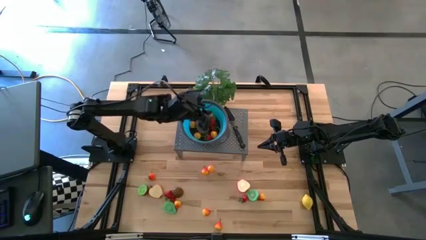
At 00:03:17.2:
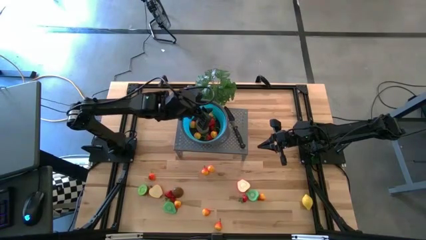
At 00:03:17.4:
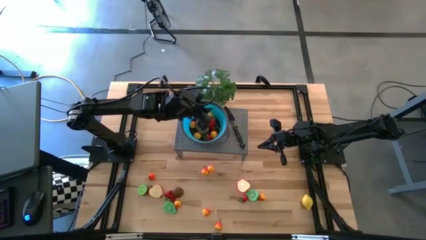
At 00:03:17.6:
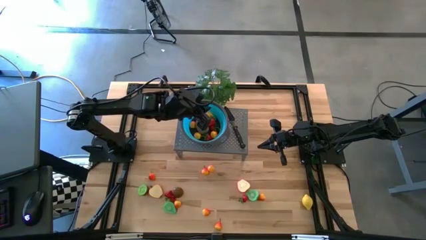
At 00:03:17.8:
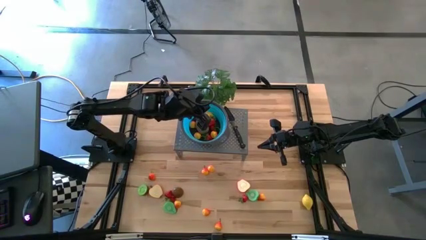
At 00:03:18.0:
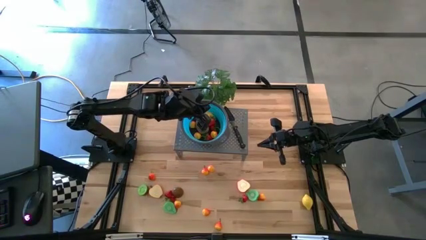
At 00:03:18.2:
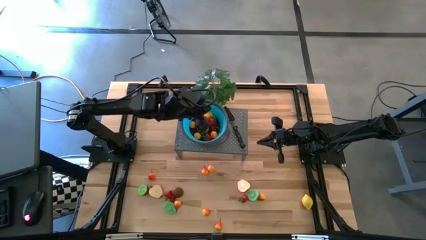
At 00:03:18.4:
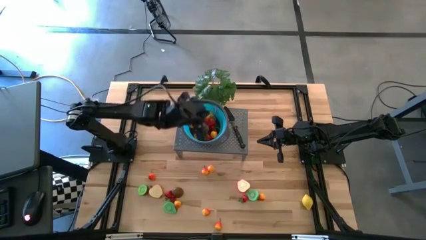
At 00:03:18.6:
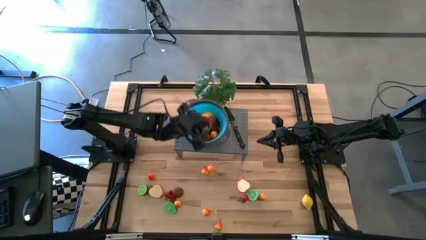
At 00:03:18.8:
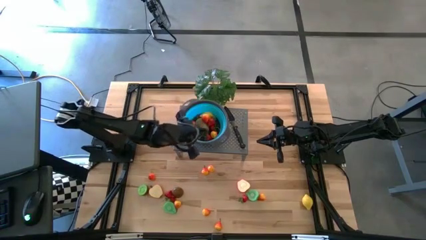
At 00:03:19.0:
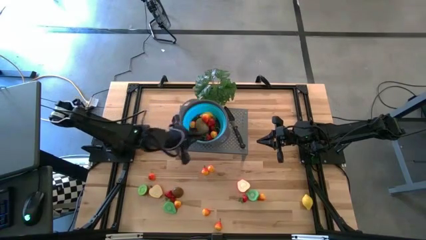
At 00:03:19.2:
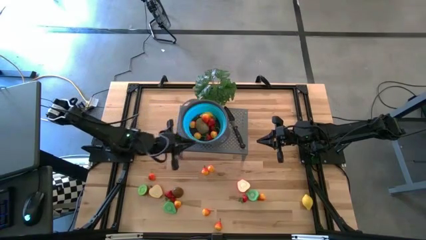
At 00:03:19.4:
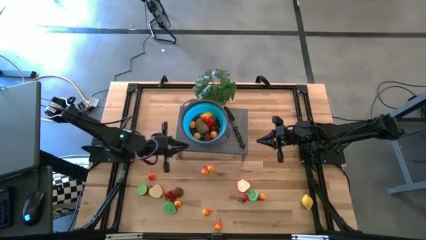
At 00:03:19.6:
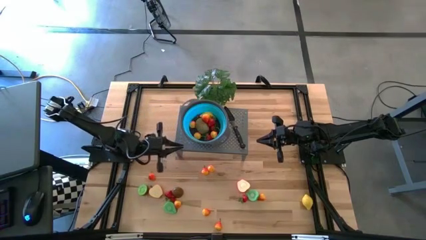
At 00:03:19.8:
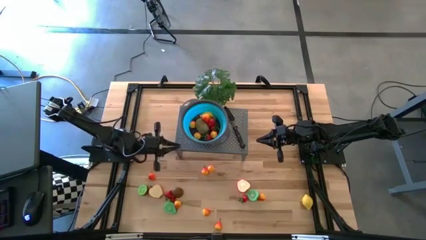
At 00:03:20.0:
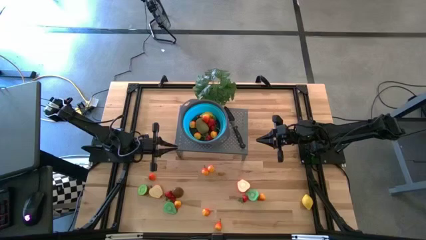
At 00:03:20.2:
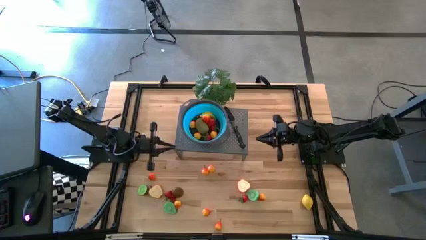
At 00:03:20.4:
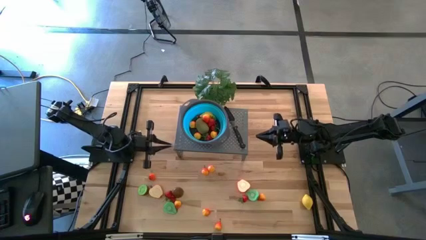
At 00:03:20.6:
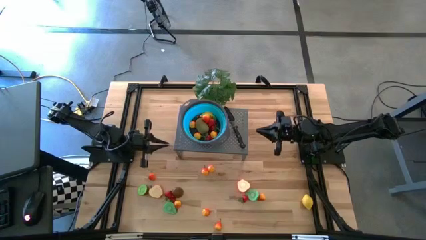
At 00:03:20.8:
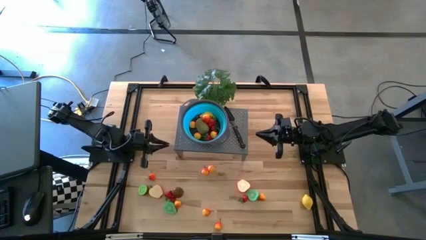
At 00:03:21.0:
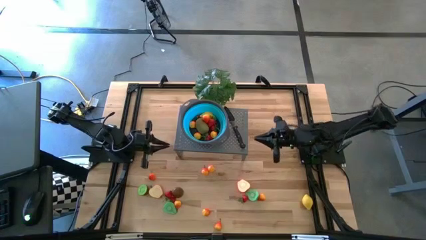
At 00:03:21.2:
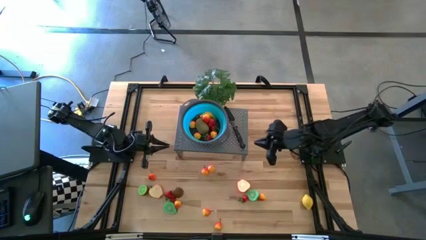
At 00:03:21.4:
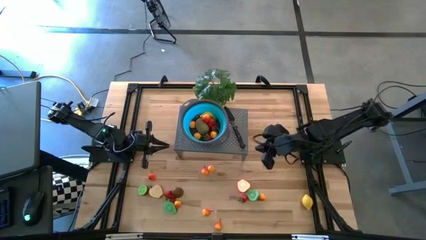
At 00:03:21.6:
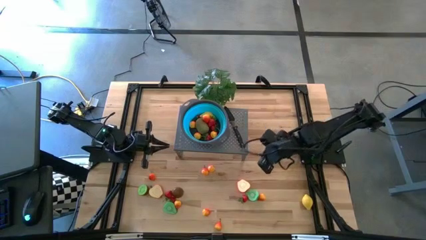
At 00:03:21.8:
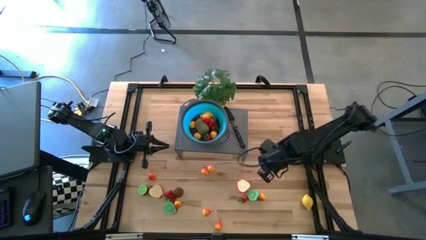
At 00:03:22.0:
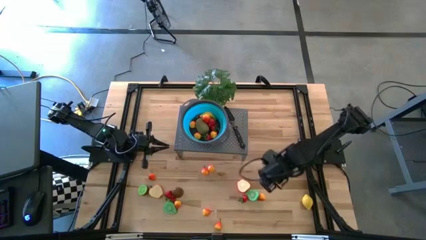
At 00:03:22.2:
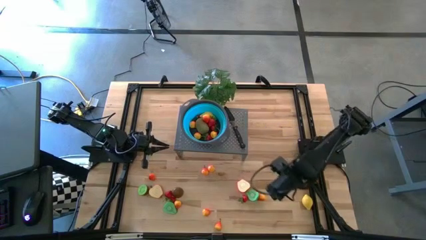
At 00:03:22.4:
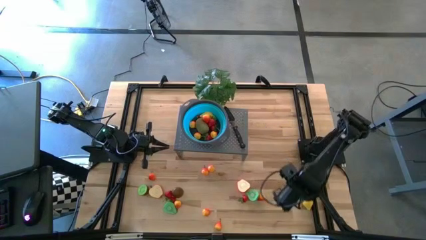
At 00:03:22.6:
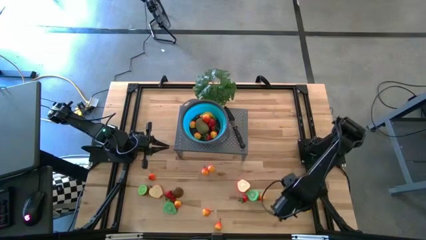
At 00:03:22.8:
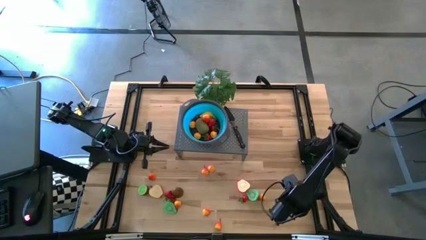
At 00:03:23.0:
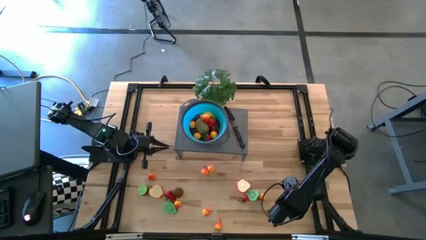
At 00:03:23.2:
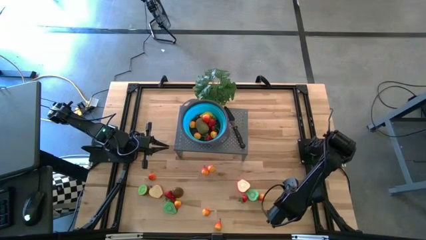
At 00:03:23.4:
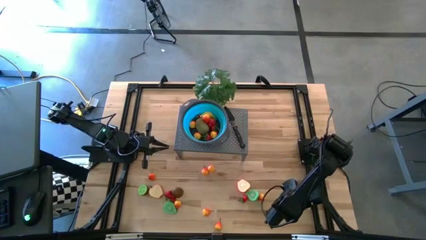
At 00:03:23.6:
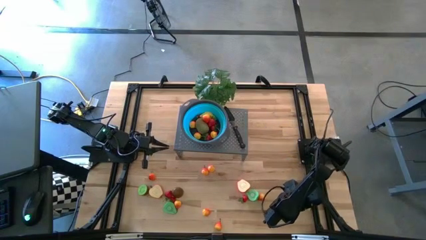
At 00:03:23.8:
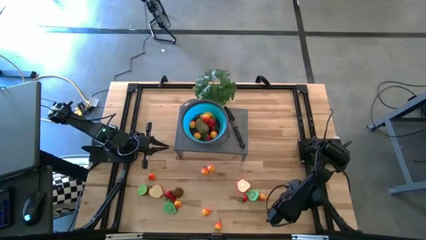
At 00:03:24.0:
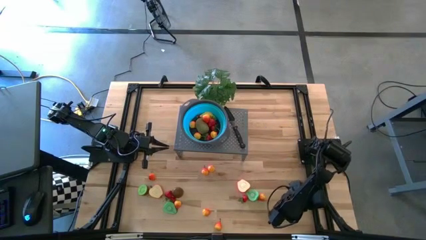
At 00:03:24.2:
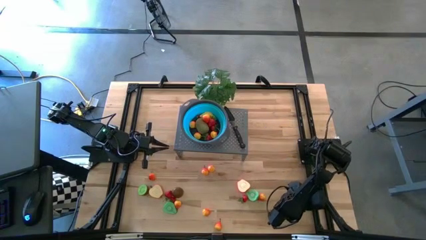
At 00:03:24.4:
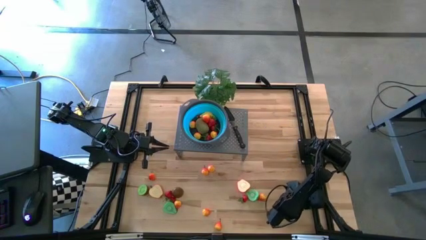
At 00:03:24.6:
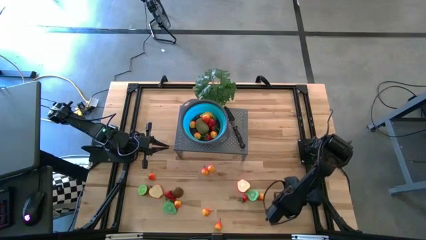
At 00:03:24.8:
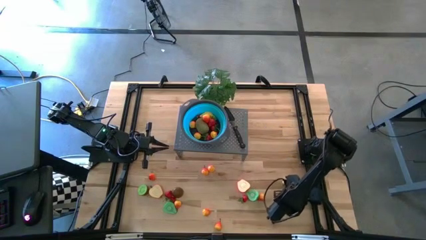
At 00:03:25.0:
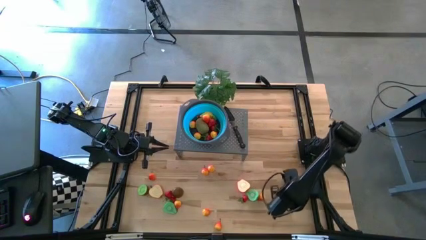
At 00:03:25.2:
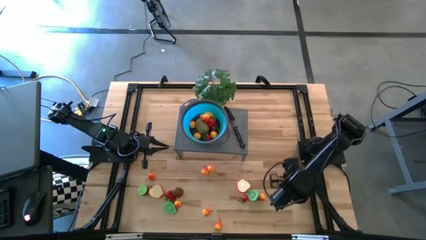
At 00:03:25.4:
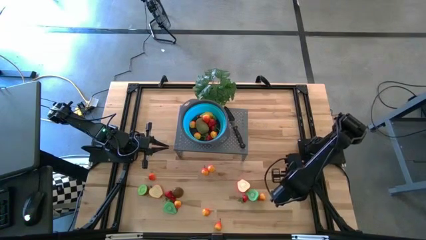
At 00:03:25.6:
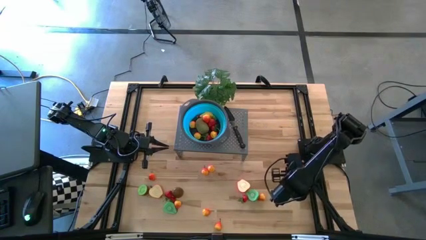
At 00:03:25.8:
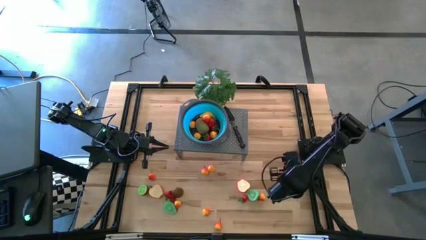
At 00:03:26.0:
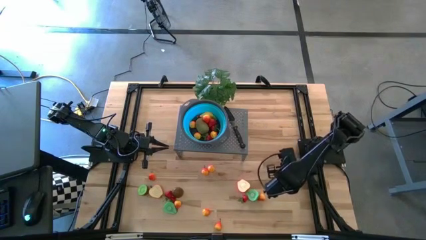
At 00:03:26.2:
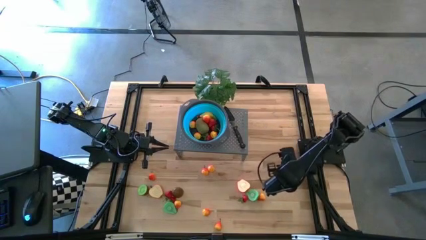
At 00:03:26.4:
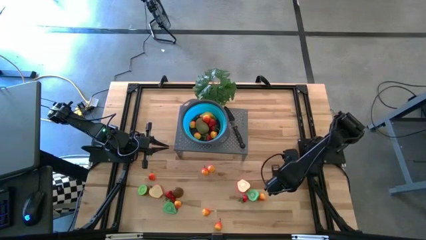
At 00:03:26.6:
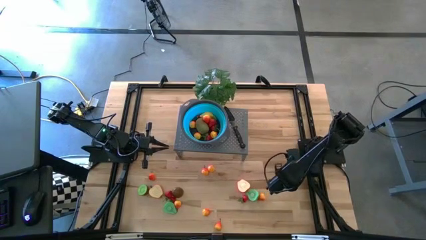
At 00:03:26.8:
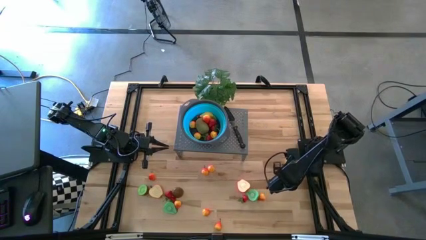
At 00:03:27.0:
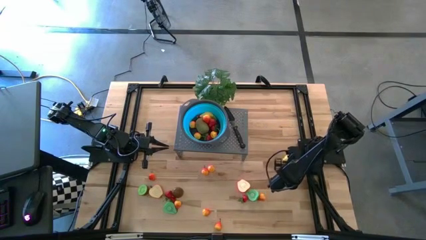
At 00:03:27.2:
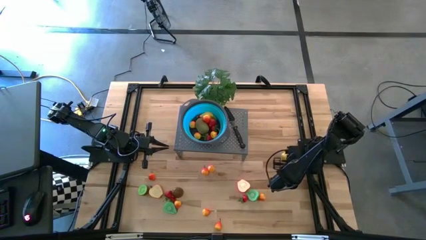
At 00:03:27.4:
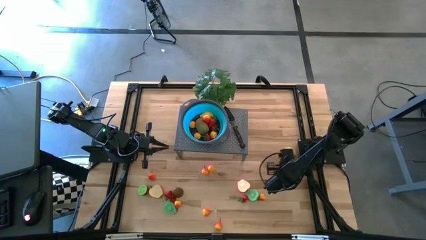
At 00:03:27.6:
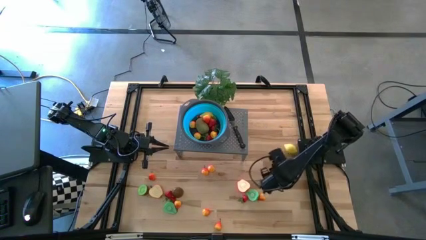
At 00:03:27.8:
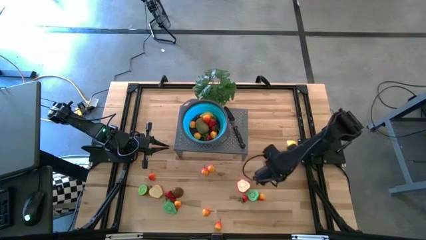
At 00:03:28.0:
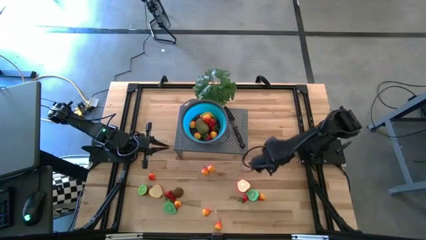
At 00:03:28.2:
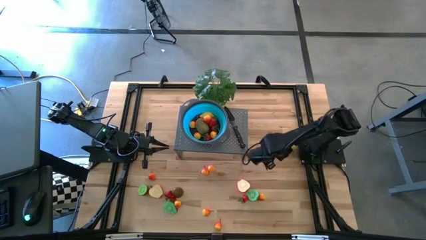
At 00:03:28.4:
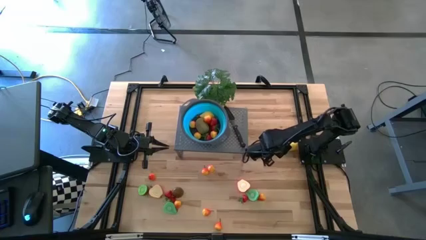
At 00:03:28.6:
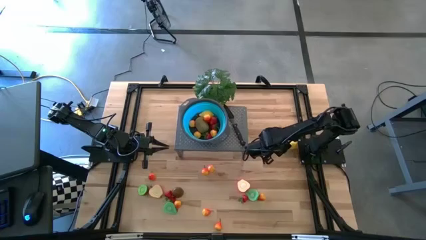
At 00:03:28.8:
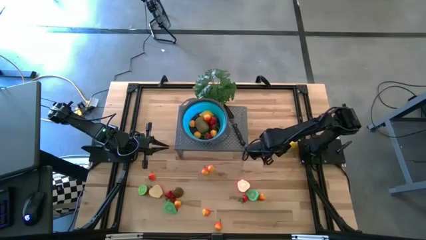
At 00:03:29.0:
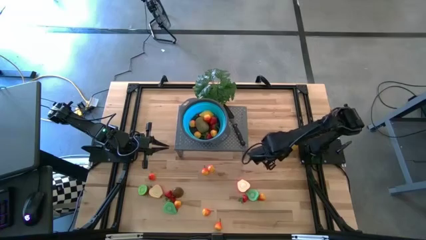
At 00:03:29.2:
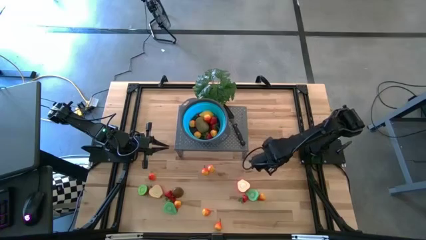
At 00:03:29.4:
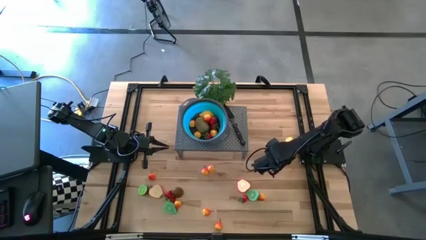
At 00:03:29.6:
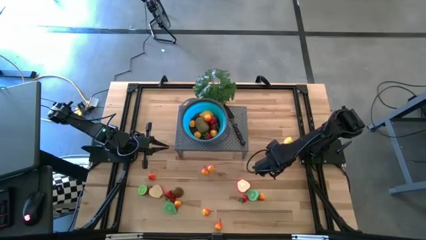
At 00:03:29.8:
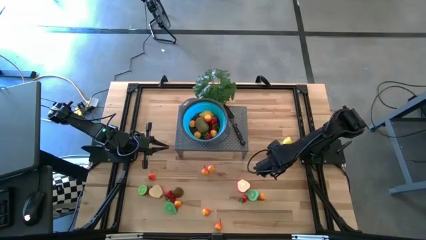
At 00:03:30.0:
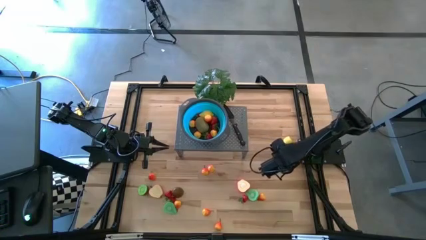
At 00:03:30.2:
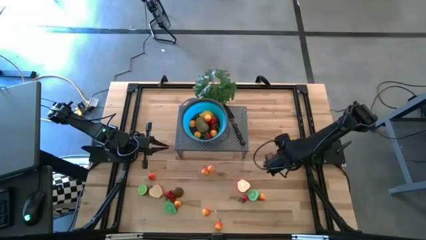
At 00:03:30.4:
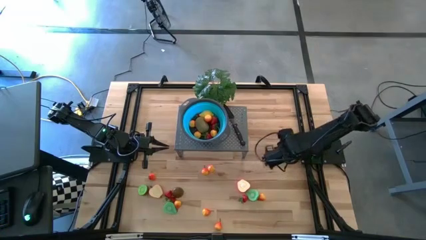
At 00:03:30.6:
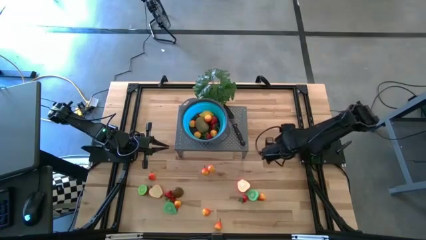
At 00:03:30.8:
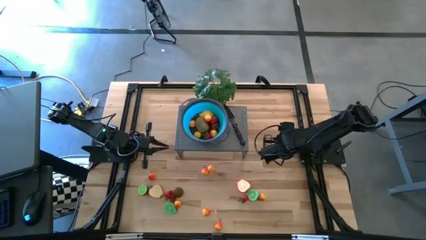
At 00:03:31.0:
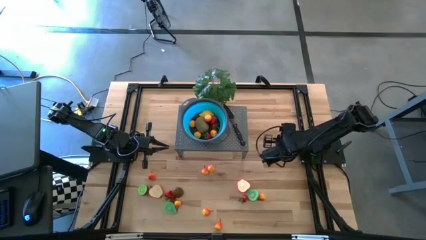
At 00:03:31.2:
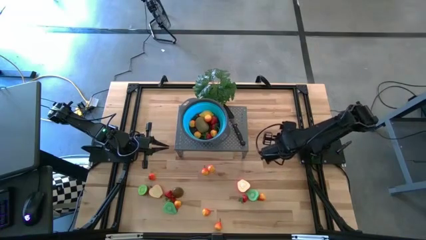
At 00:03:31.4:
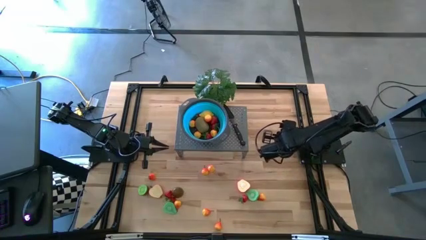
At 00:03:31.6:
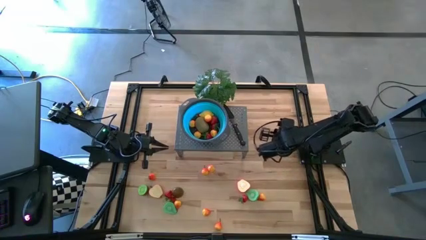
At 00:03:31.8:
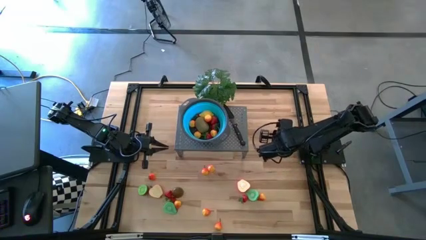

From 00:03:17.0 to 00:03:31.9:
Task: Pick & Place Fruit
Put the lemon into the blue strainer bowl on the shelf
